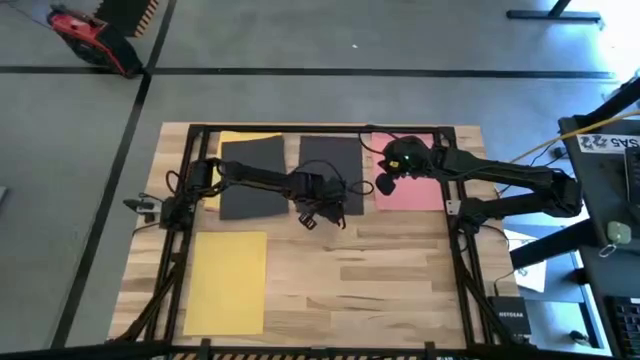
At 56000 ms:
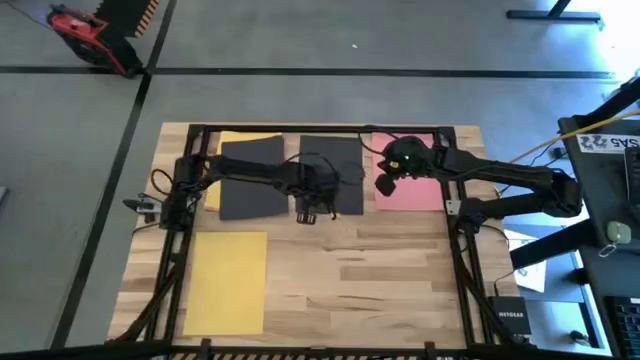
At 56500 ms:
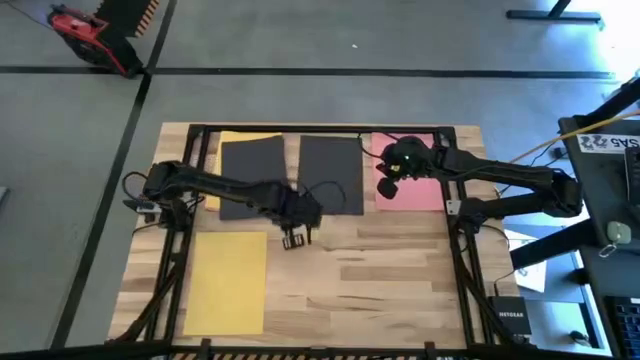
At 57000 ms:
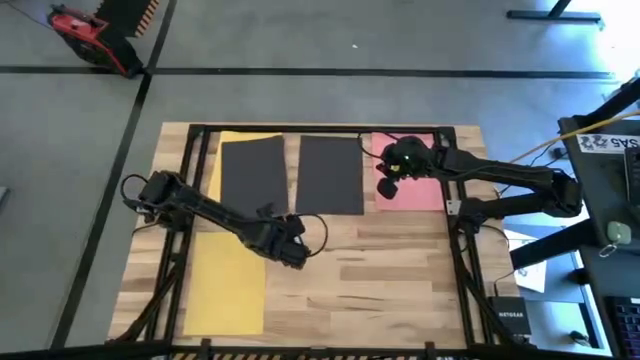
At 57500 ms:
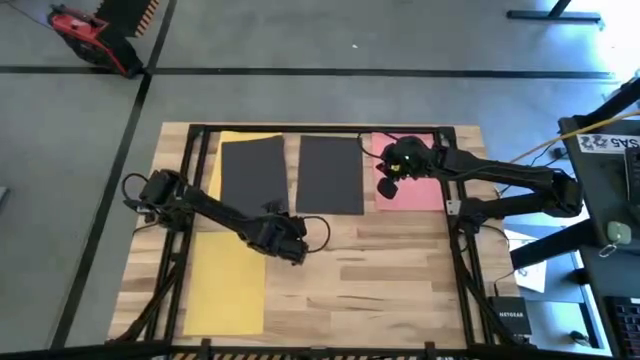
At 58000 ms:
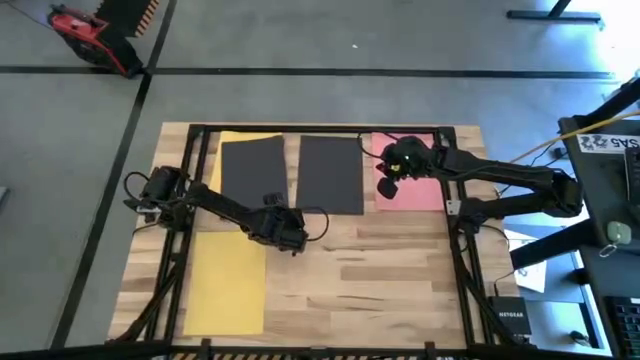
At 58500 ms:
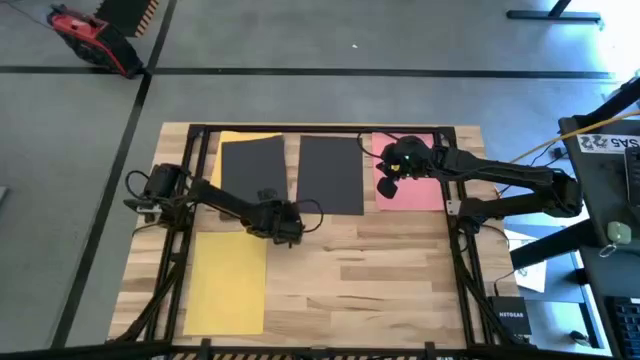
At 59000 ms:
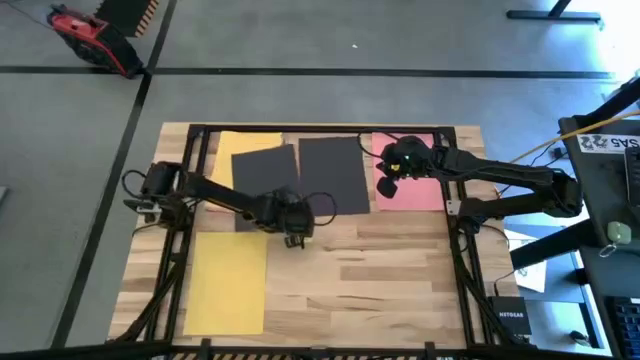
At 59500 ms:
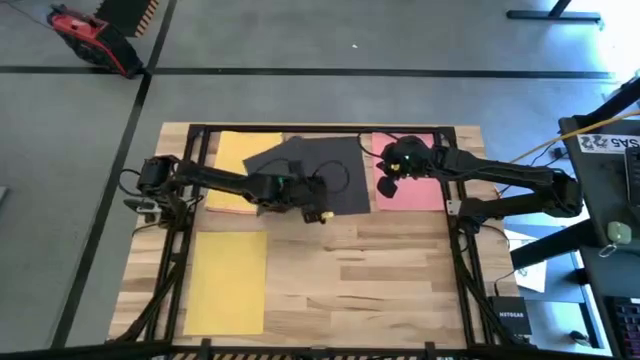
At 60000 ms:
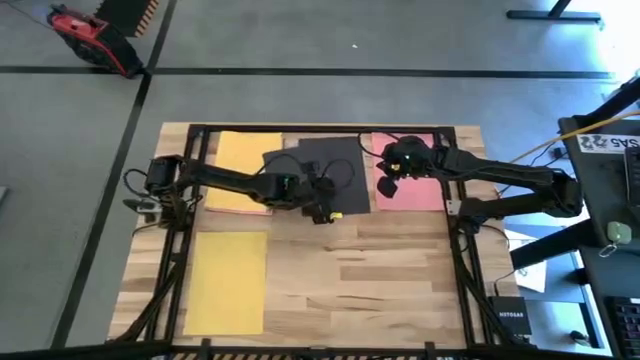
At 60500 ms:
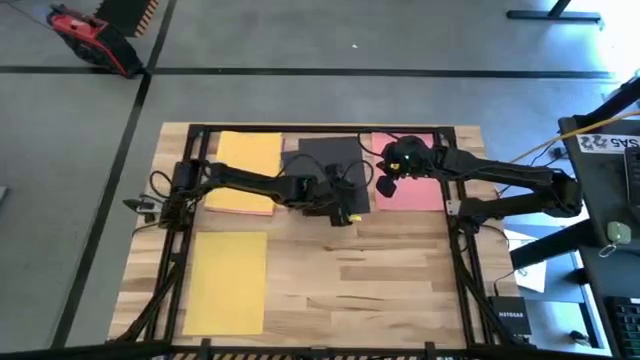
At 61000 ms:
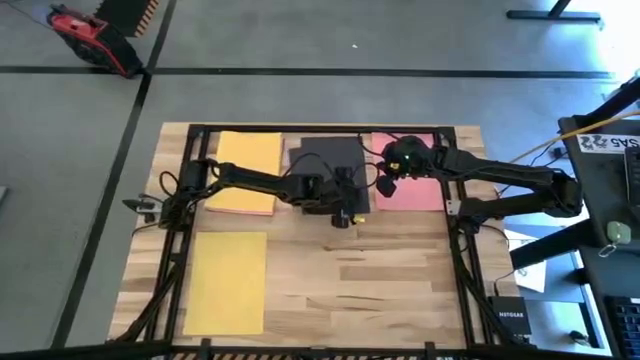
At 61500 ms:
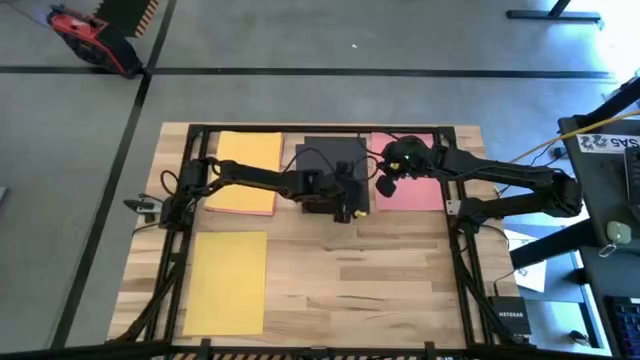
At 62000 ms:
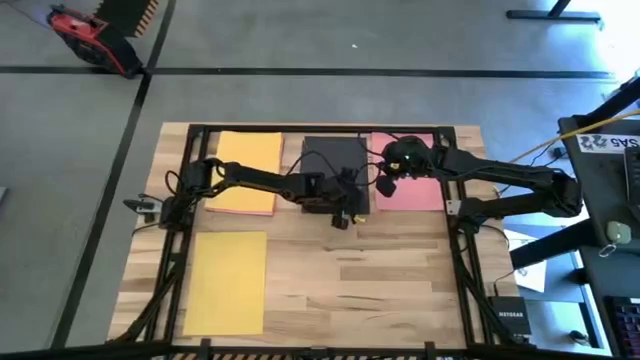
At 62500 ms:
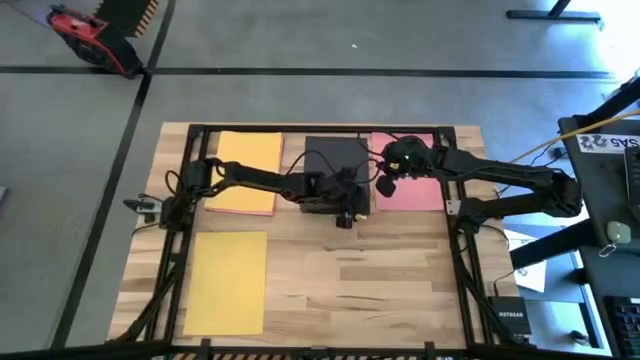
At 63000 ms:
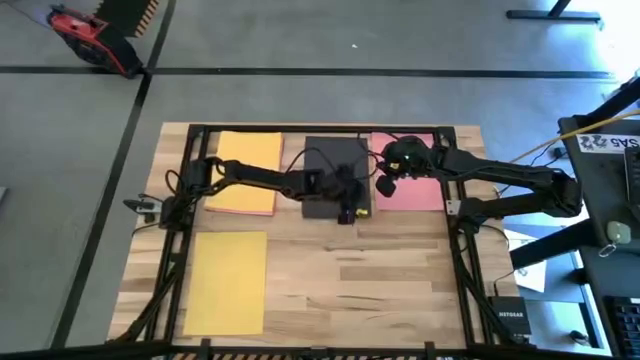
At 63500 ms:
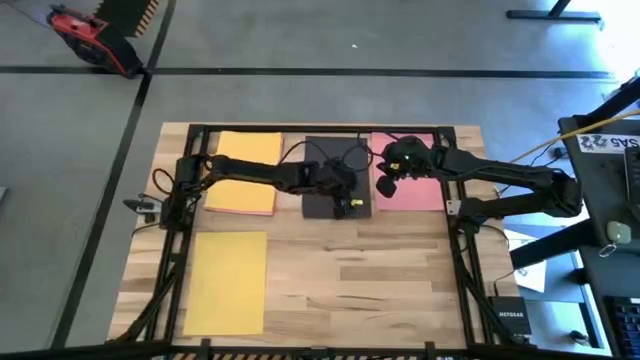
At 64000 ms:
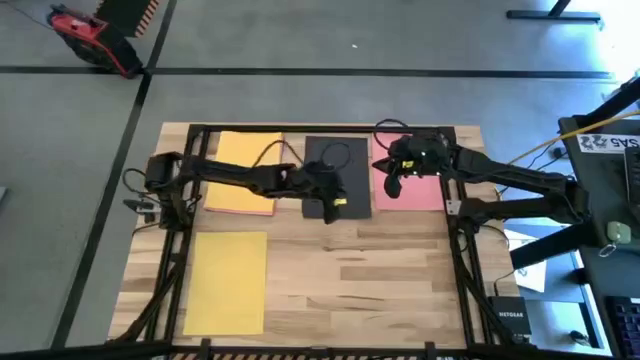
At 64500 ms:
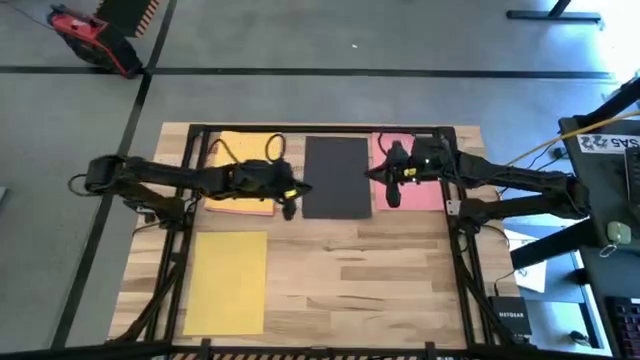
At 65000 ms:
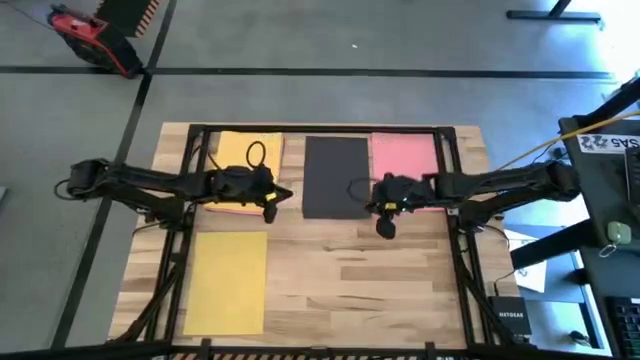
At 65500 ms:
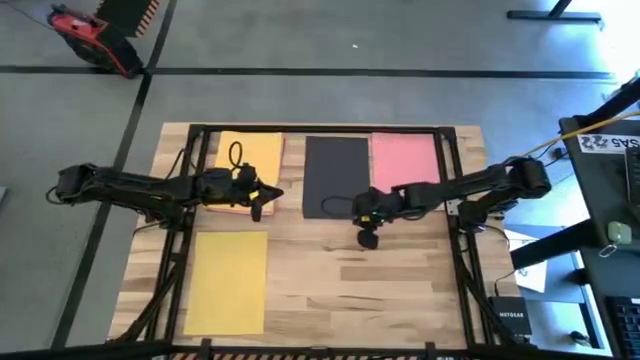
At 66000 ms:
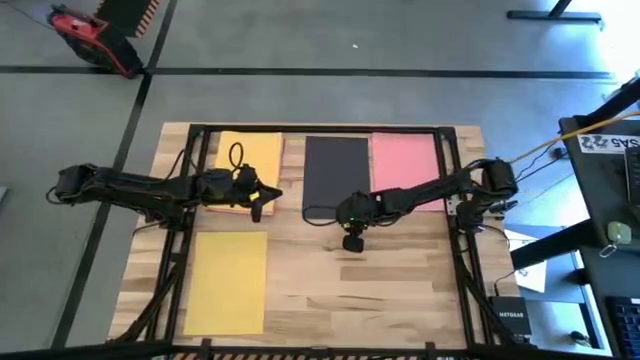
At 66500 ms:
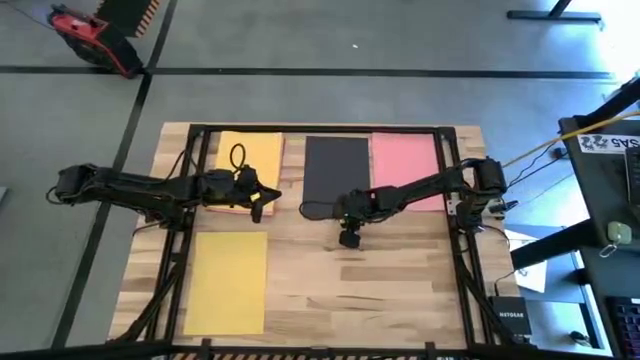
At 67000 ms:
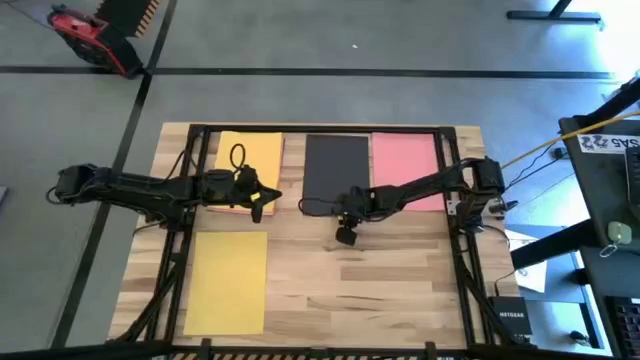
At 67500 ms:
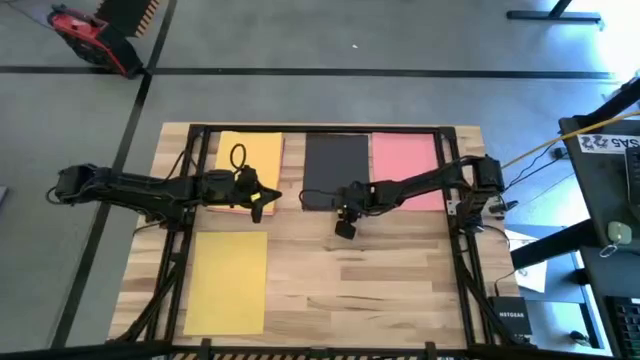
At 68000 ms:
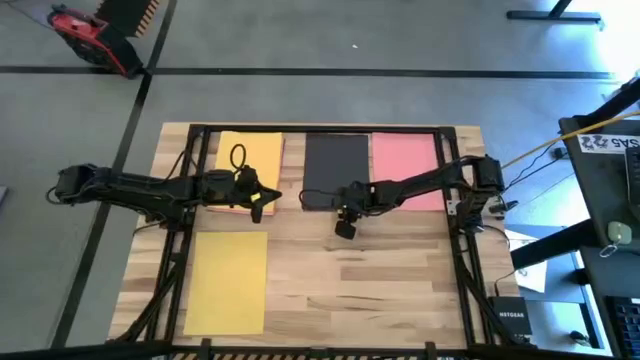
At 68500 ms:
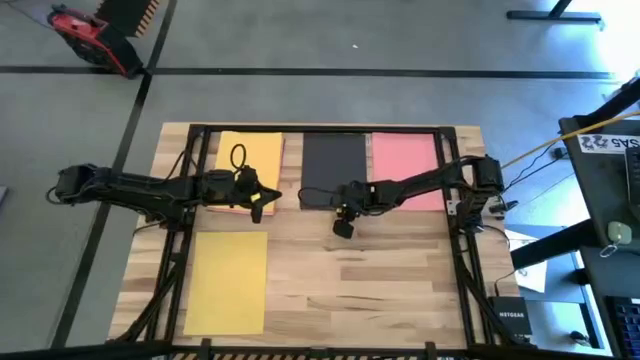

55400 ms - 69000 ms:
Task: Organize paper
Stack the black paper on the top of the other black paper

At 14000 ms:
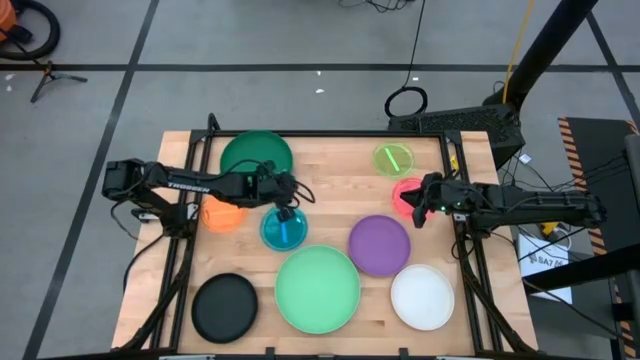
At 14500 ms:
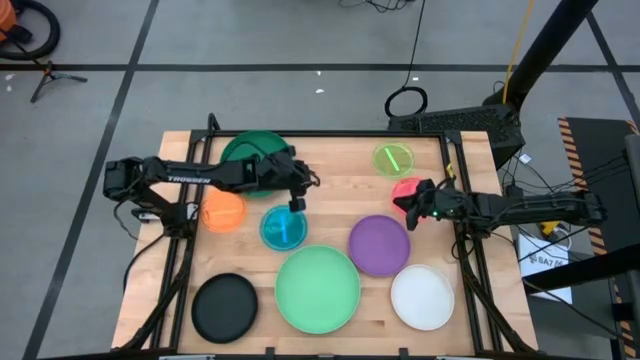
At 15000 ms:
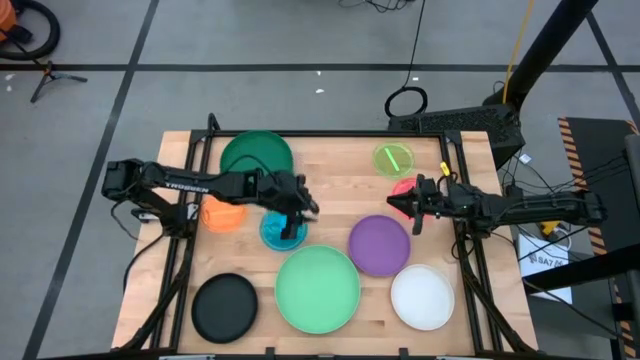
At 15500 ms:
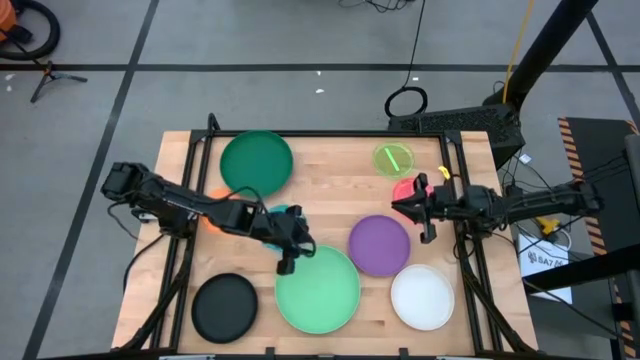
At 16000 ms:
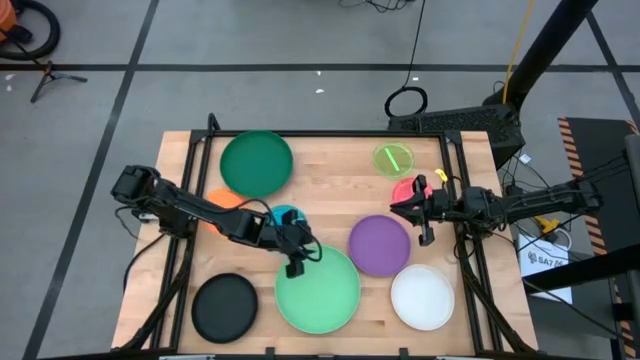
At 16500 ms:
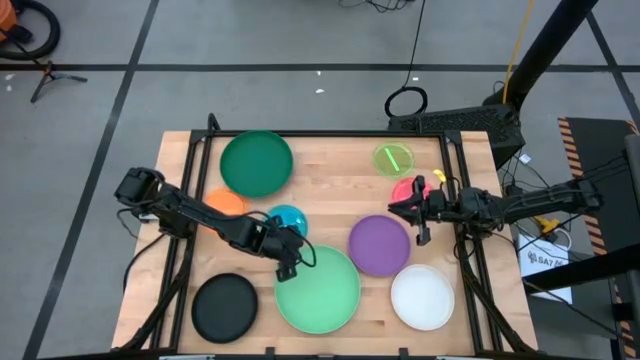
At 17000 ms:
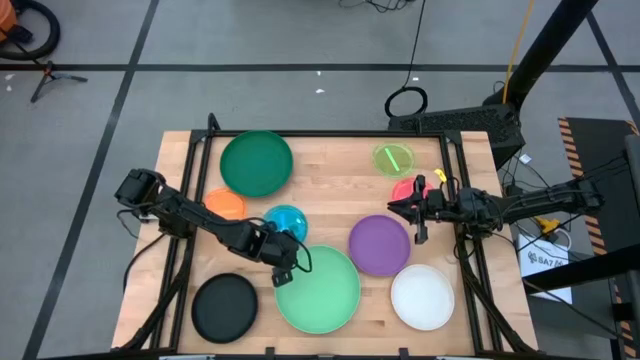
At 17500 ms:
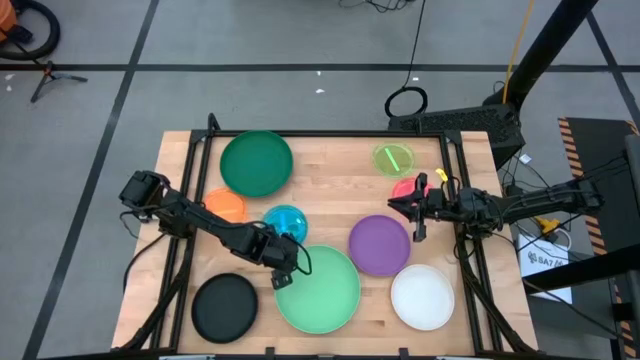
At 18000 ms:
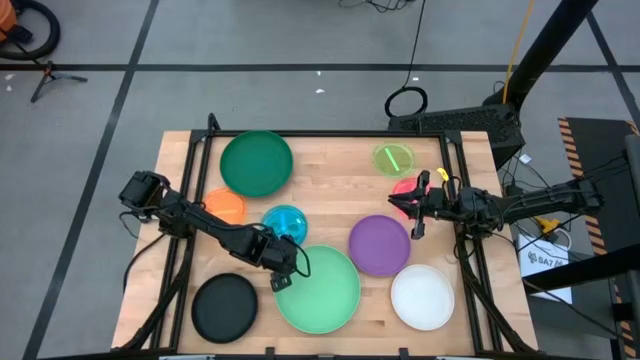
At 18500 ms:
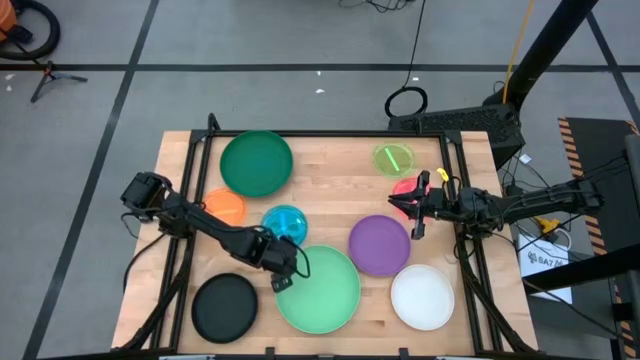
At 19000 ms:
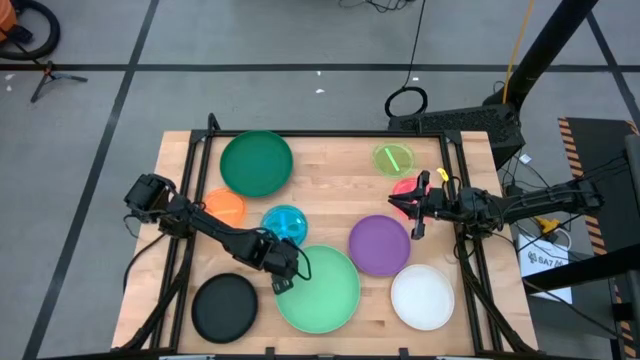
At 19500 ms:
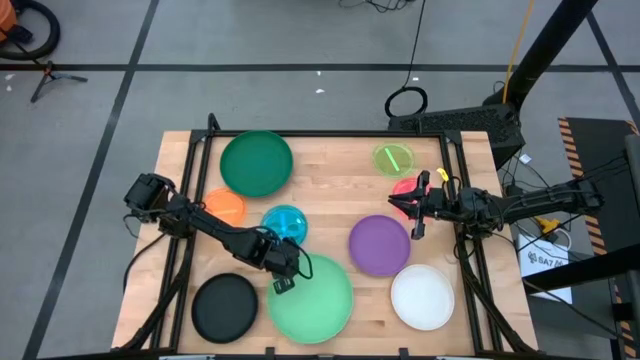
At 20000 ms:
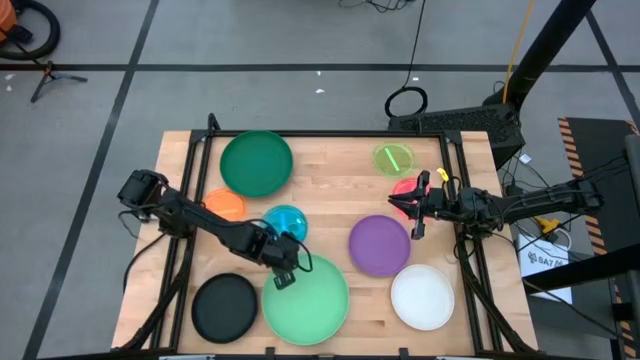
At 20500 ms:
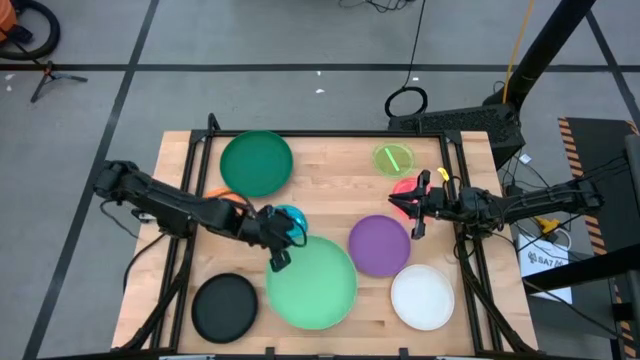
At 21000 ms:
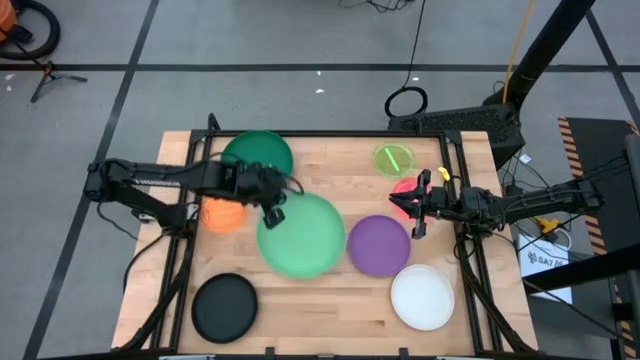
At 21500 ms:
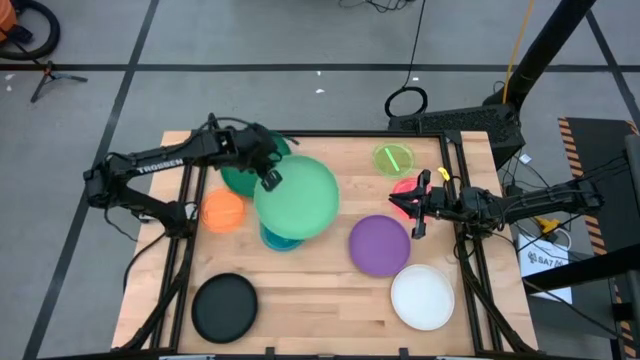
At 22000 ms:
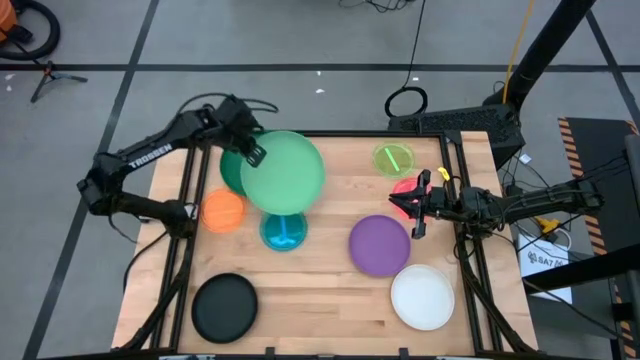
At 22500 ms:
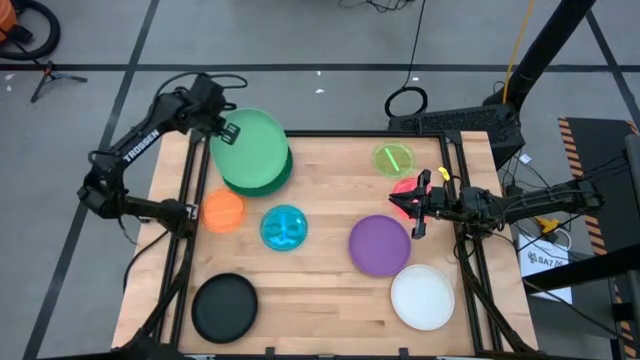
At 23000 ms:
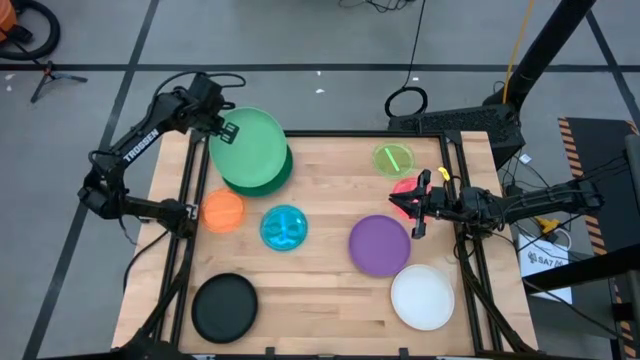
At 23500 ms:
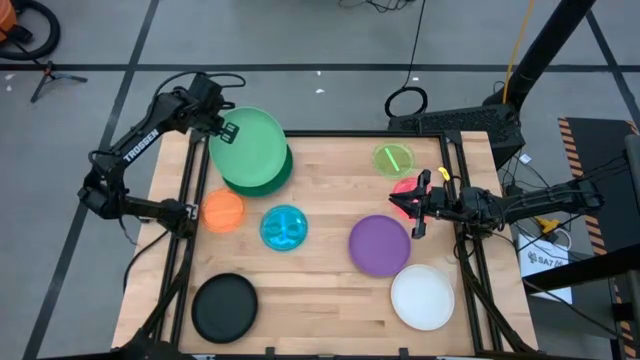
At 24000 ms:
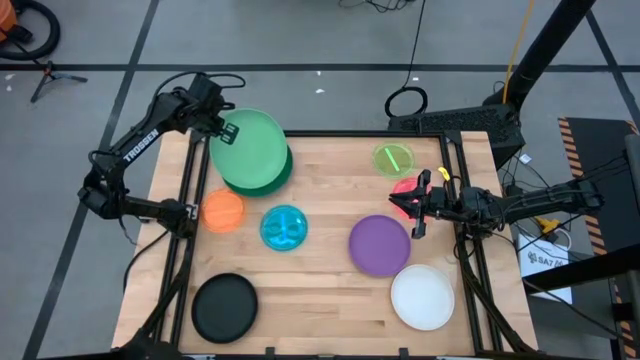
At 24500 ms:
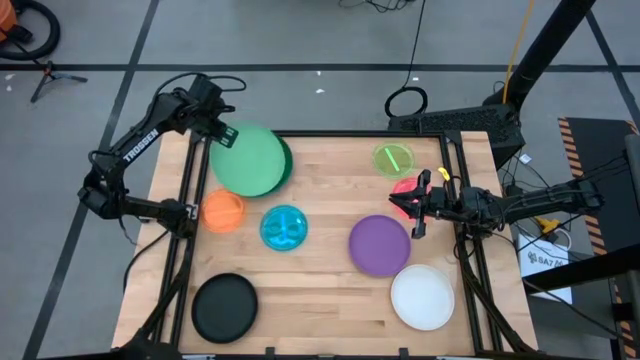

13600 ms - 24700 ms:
Task: Stack plastic plates
Stack the large green plate on top of the large green plate
